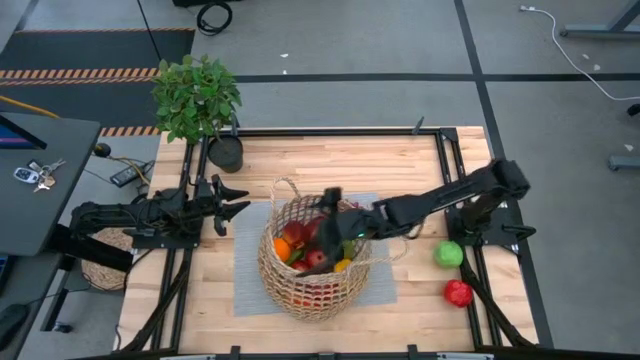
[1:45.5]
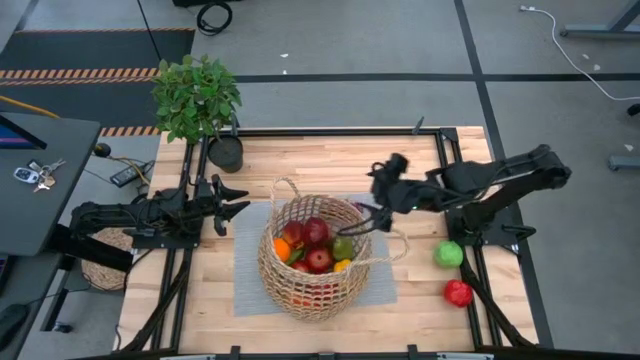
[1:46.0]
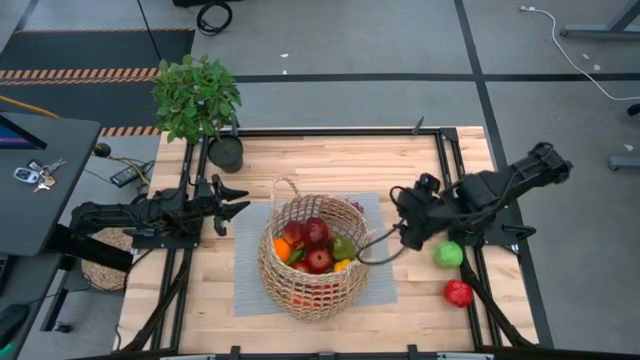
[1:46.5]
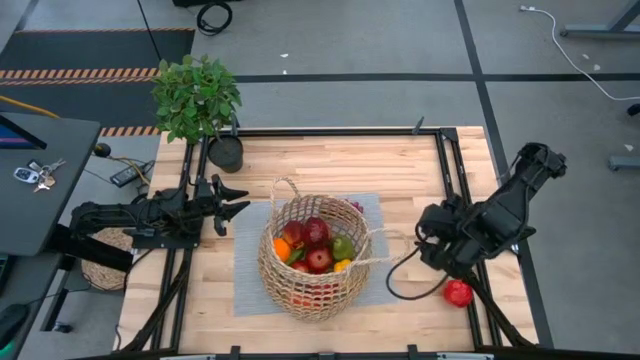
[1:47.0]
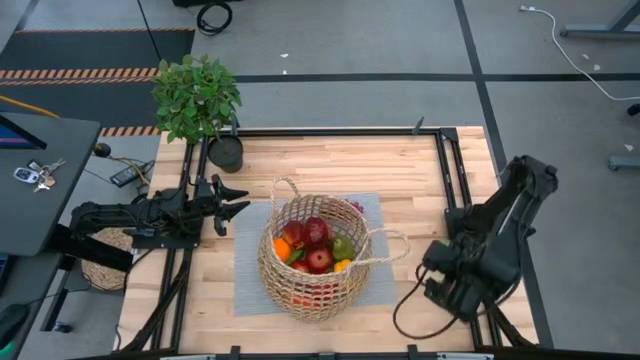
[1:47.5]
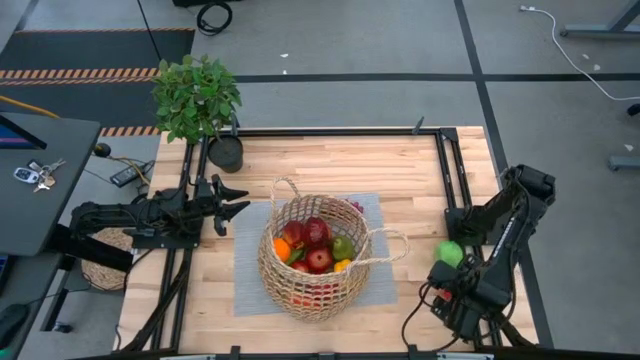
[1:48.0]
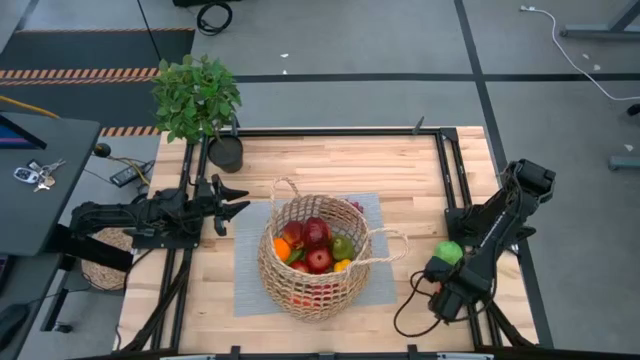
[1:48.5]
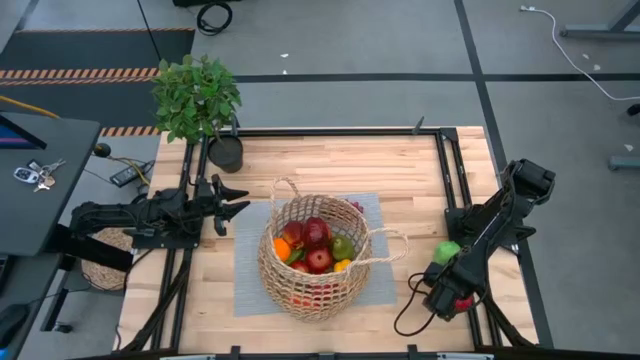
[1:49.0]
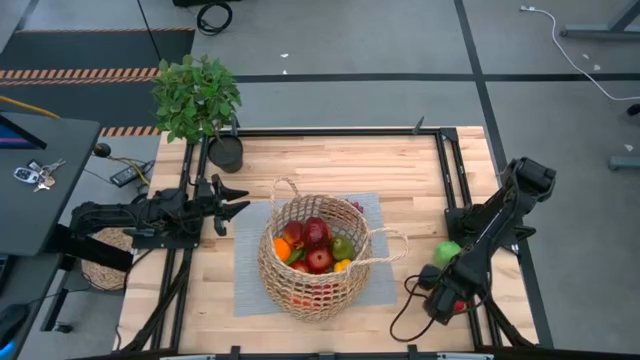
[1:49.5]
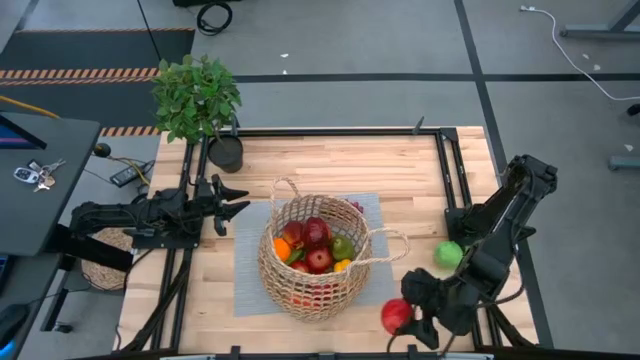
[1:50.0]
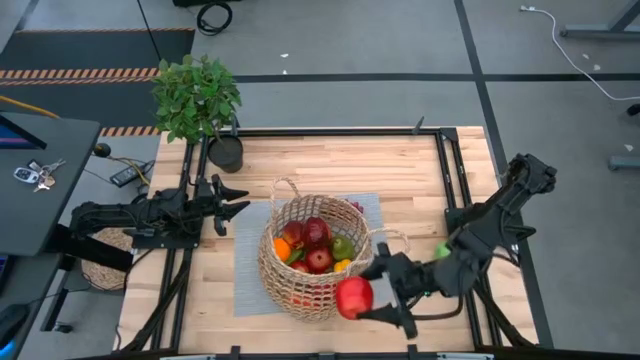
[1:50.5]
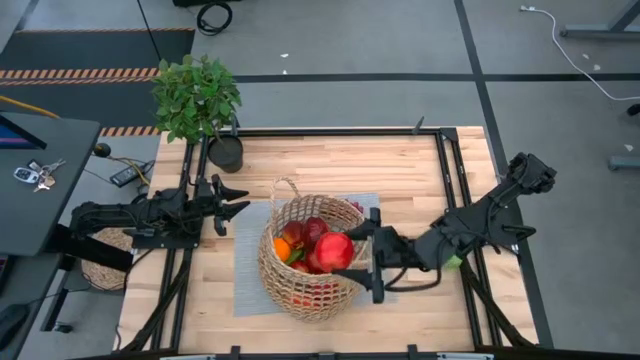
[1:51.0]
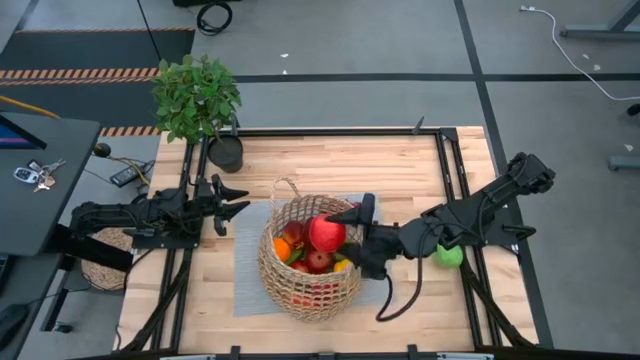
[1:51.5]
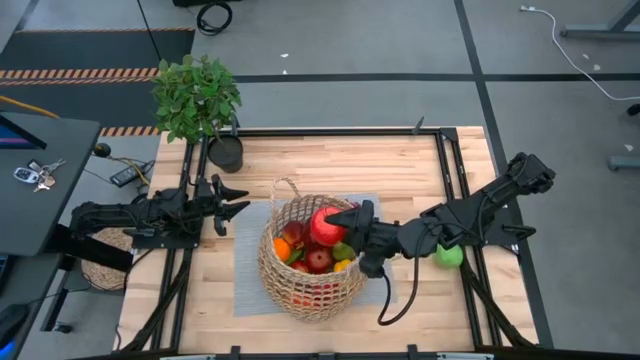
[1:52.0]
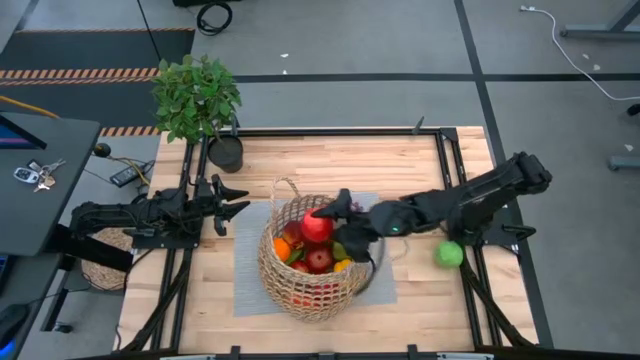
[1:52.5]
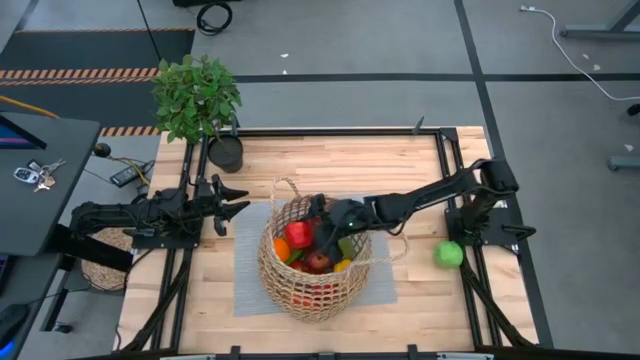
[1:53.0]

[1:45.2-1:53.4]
Task: Build produce basket
Put the red apple into the basket

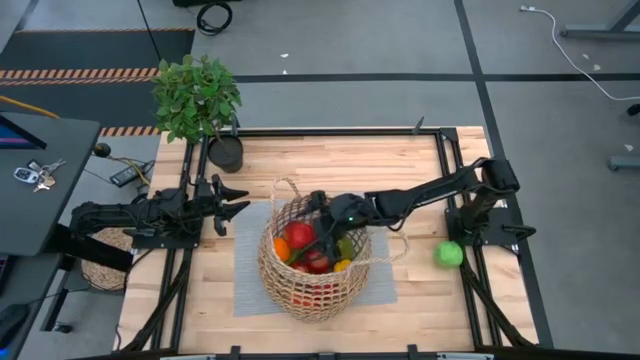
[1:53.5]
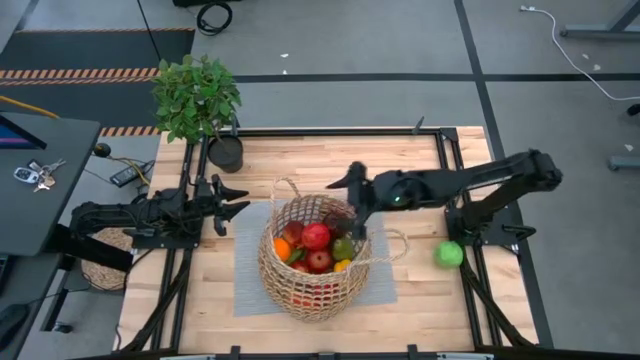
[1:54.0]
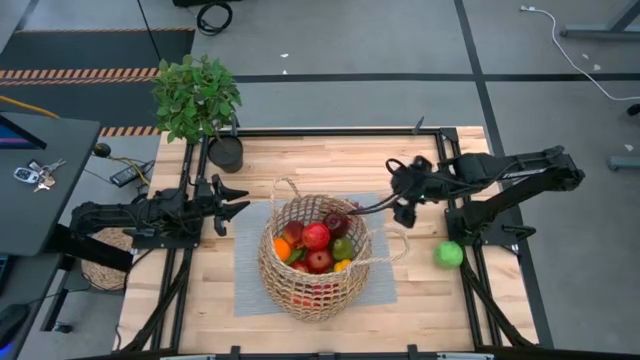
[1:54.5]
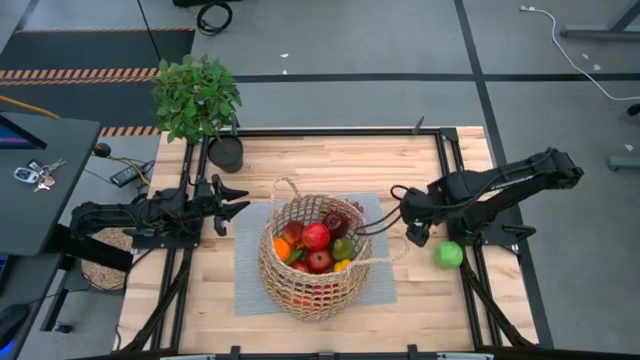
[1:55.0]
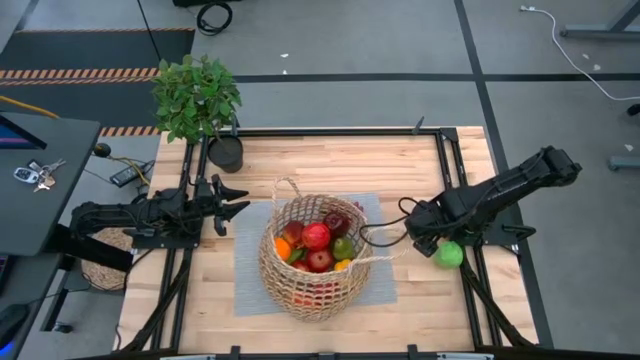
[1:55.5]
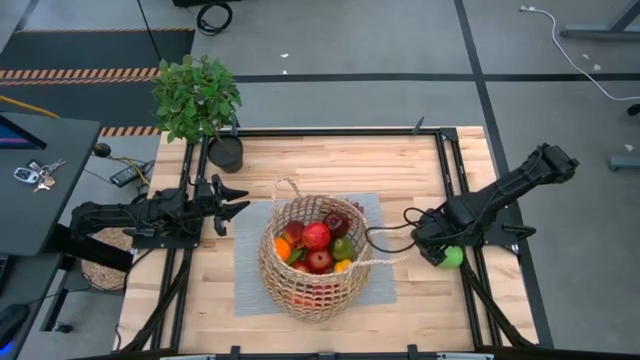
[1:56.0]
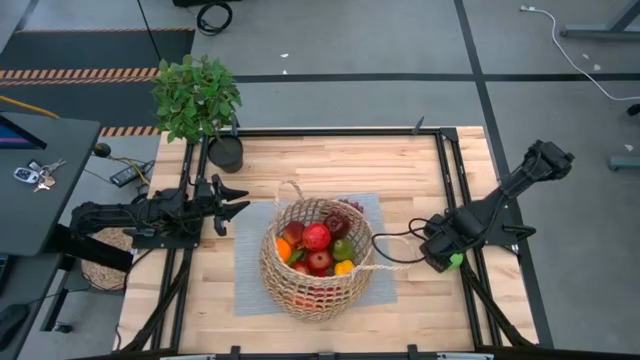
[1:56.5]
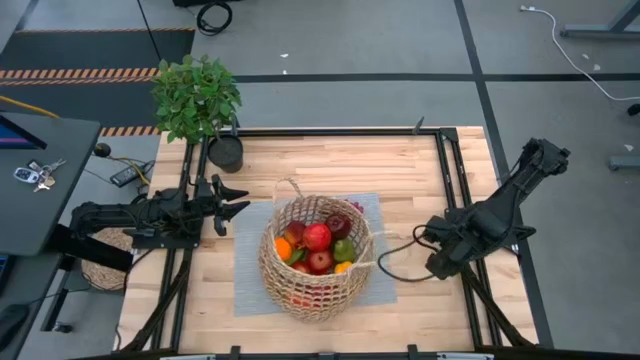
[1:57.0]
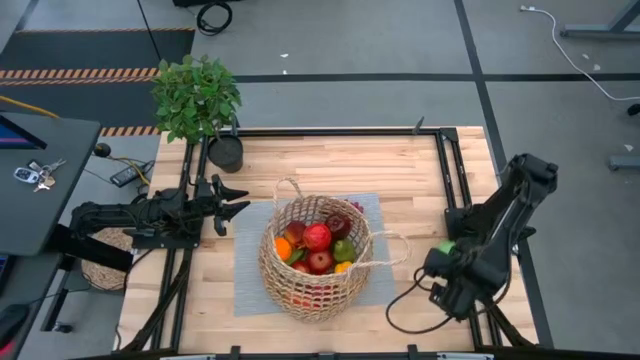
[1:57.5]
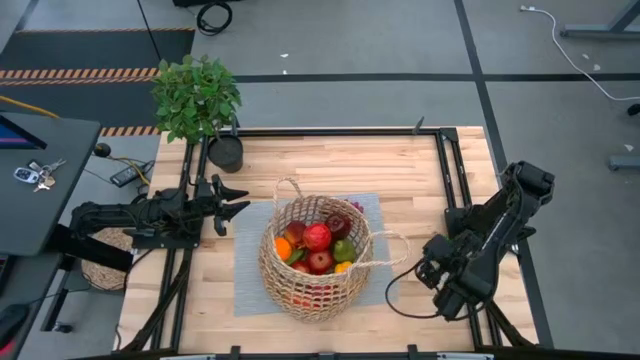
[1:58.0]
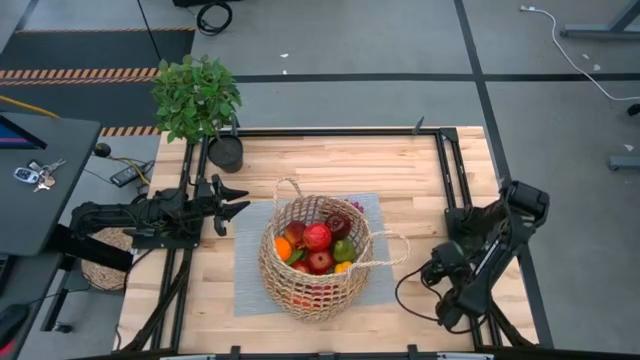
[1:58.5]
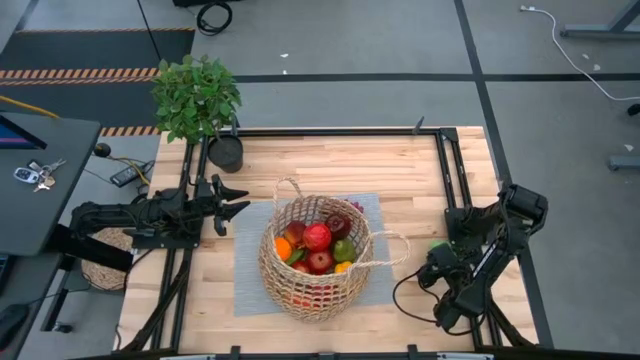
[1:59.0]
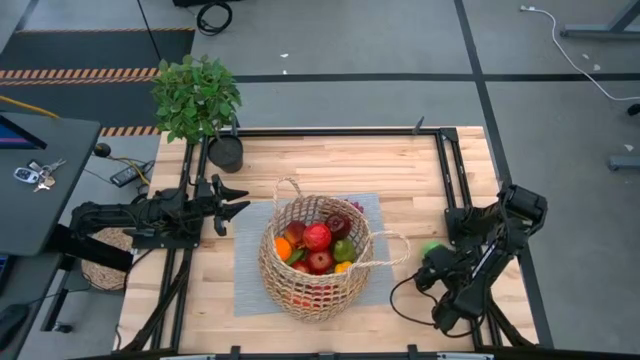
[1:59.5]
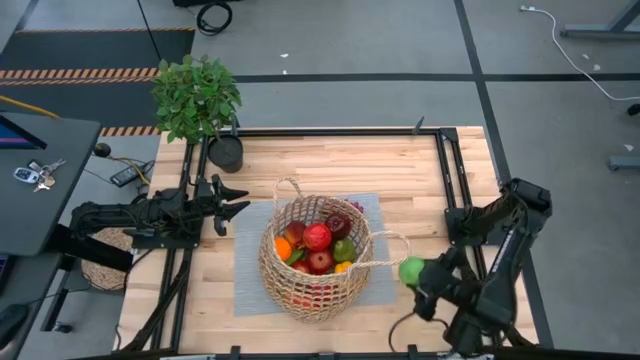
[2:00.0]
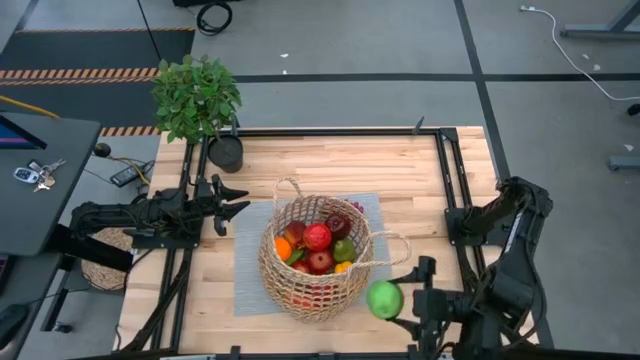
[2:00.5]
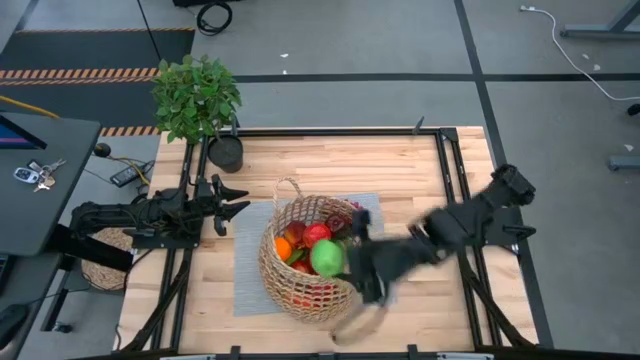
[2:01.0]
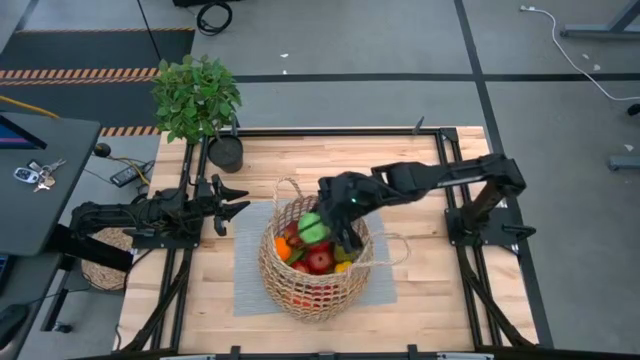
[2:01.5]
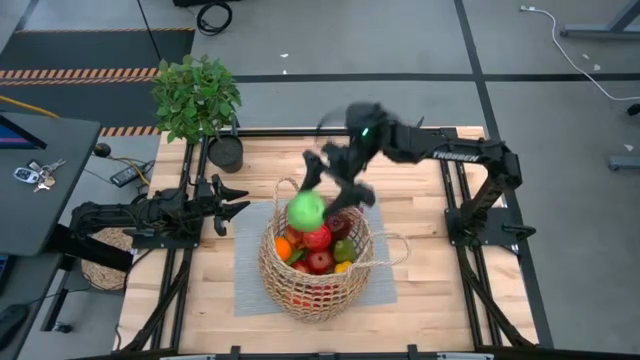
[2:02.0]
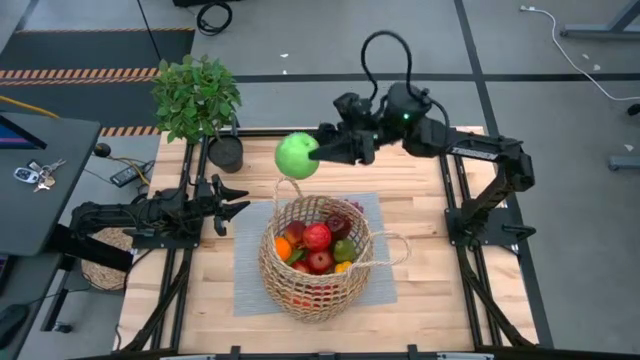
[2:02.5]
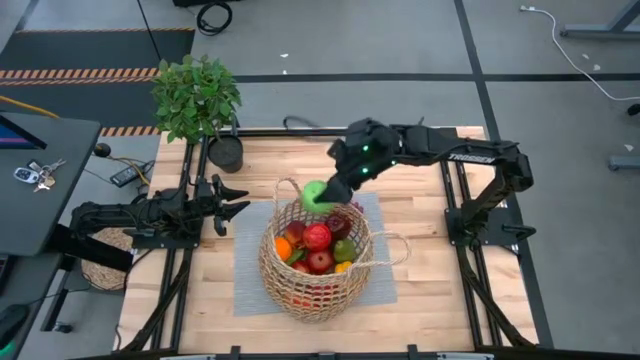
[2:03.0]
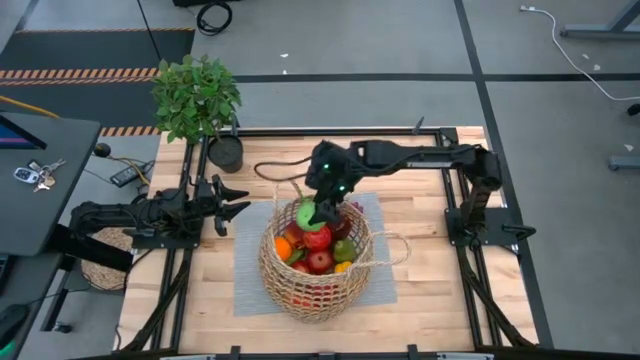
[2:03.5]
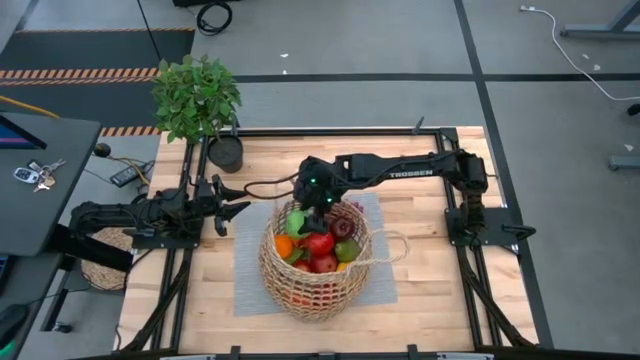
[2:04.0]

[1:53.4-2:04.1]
Put the green apple into the basket

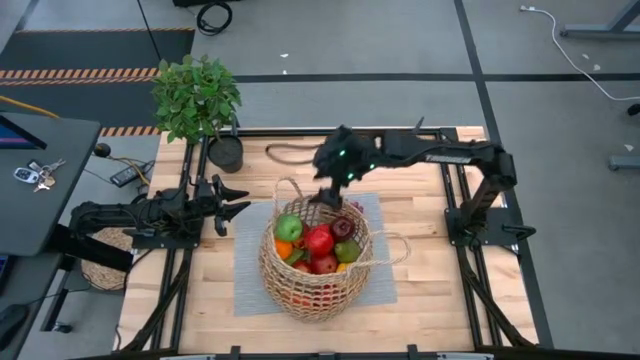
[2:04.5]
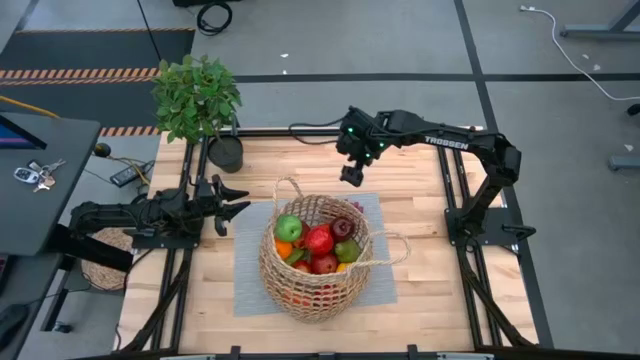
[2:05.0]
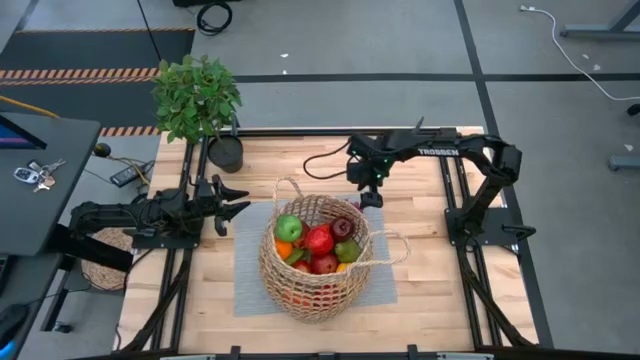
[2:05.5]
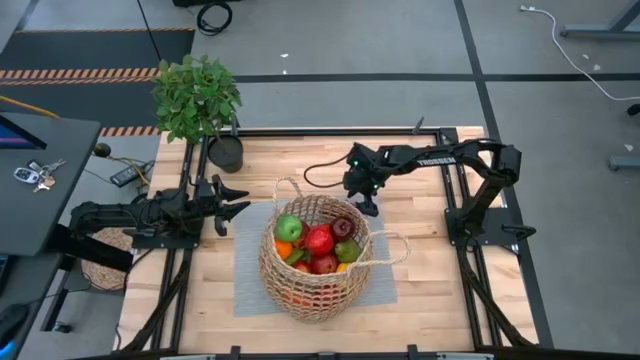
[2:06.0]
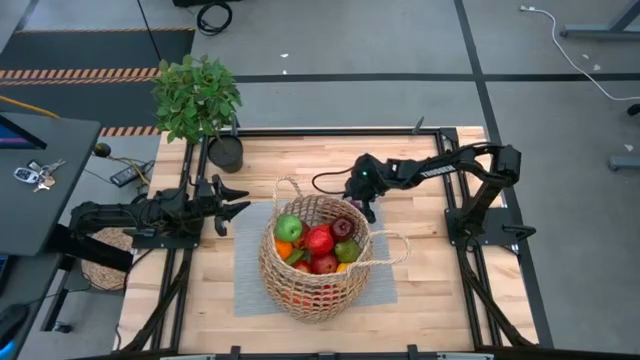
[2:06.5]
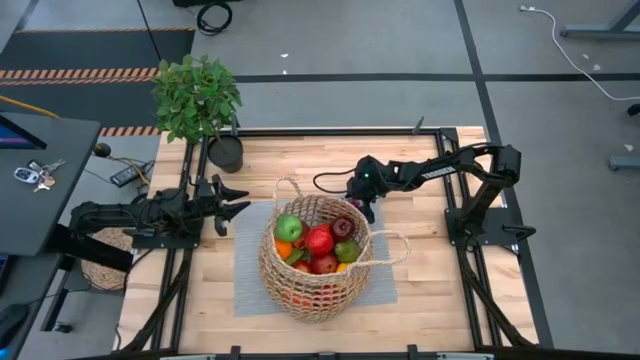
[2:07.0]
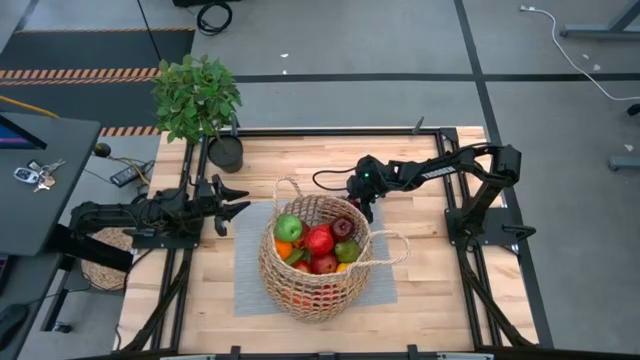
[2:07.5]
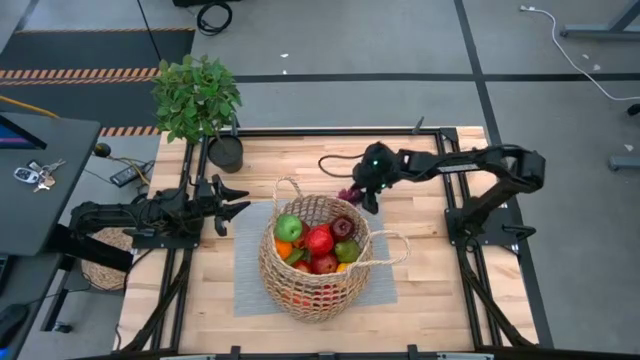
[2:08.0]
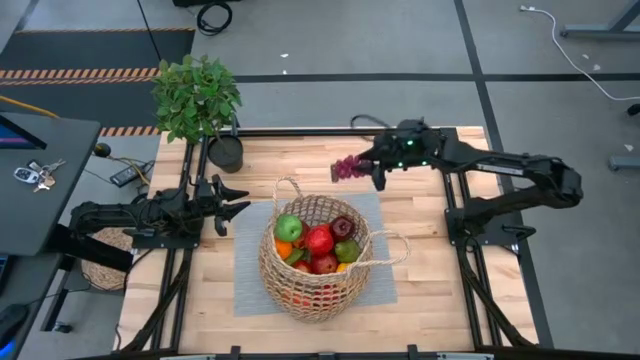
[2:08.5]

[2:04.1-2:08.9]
Put the purple grapes into the basket
